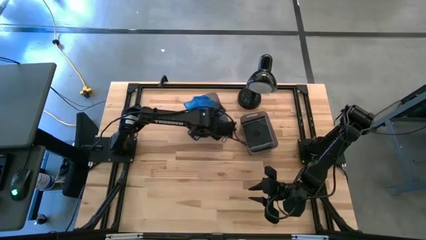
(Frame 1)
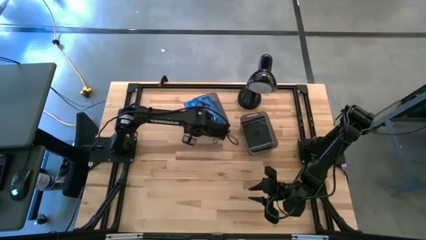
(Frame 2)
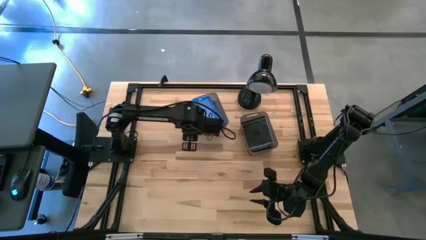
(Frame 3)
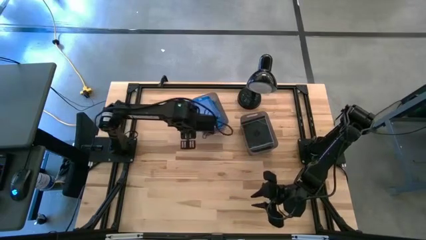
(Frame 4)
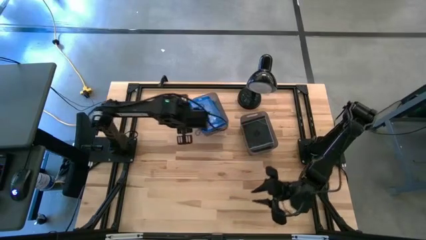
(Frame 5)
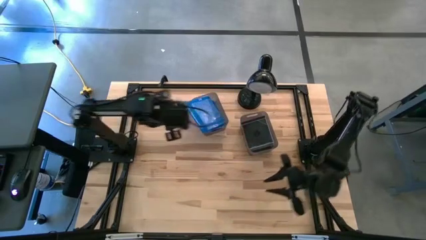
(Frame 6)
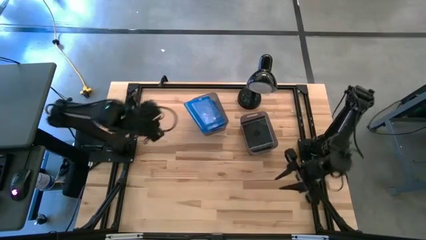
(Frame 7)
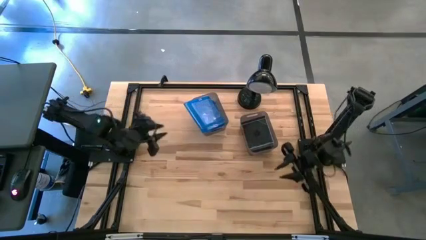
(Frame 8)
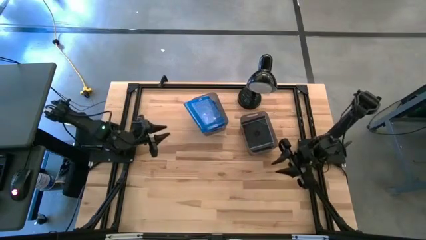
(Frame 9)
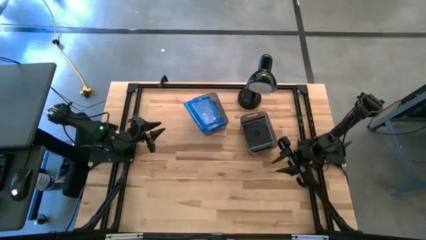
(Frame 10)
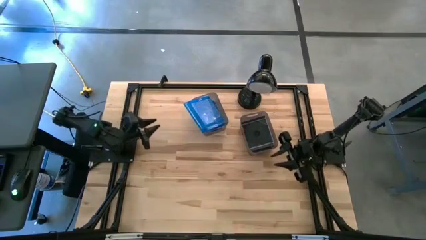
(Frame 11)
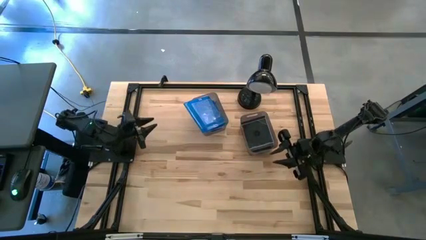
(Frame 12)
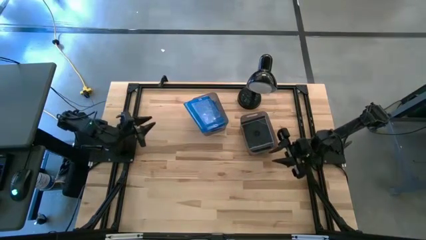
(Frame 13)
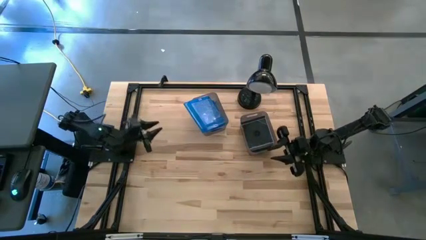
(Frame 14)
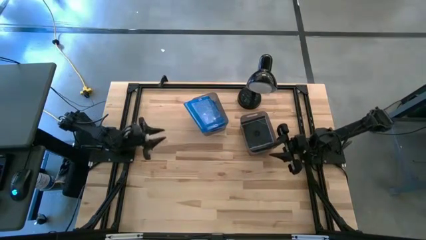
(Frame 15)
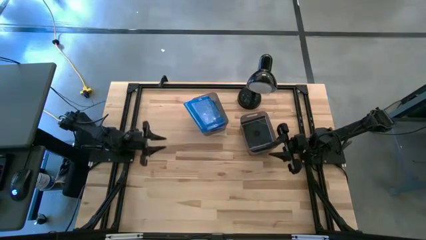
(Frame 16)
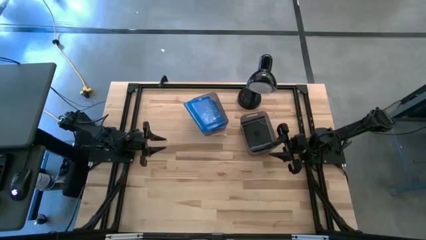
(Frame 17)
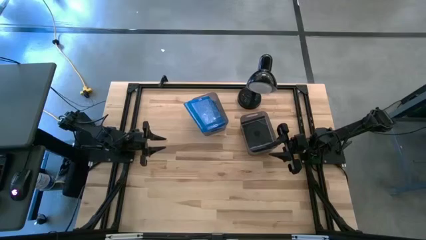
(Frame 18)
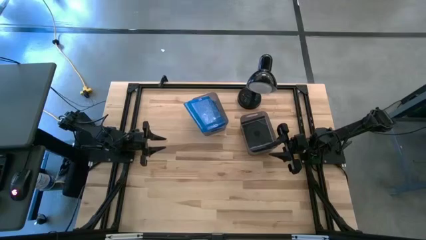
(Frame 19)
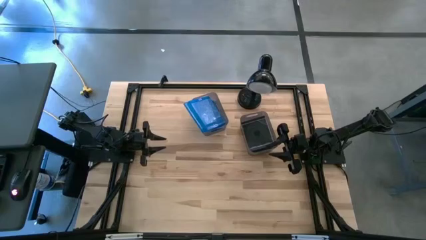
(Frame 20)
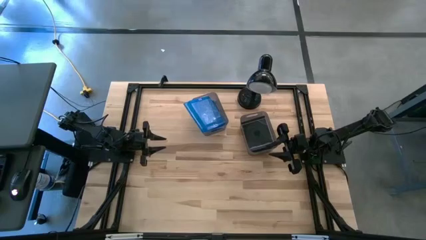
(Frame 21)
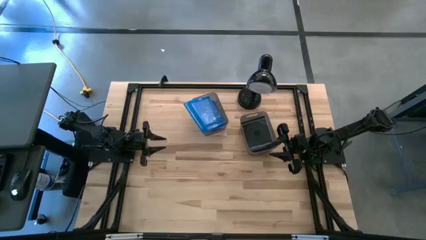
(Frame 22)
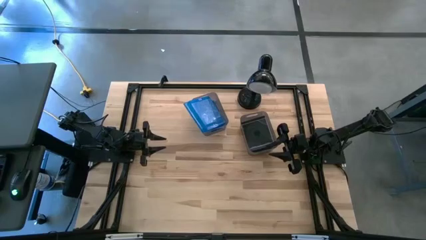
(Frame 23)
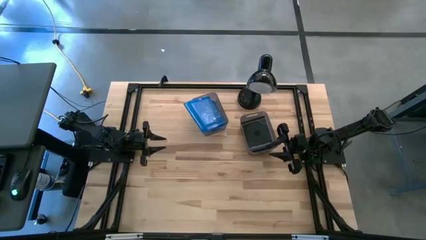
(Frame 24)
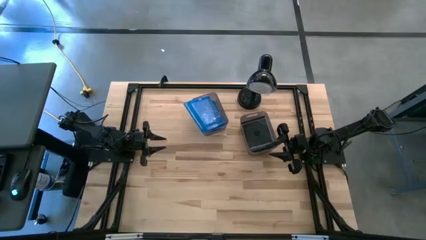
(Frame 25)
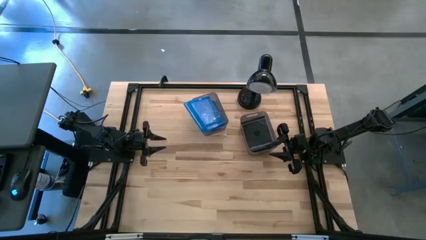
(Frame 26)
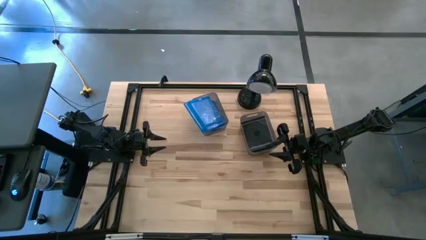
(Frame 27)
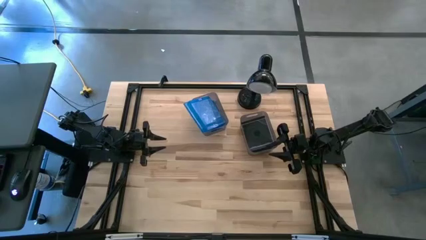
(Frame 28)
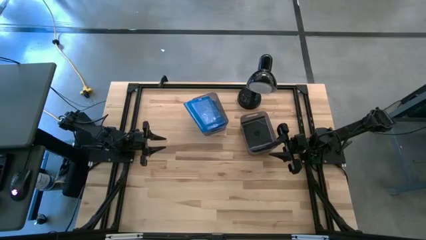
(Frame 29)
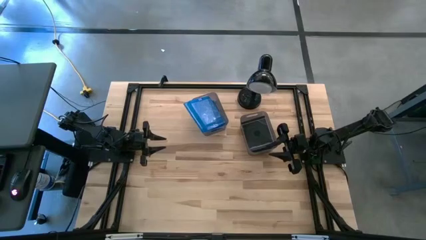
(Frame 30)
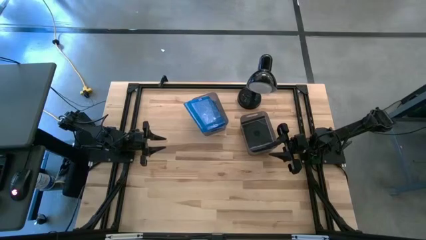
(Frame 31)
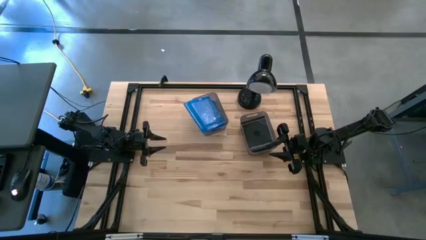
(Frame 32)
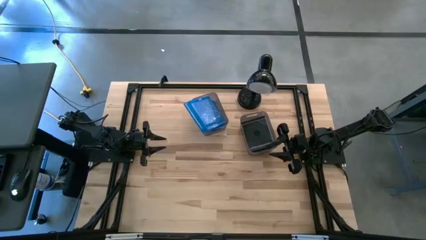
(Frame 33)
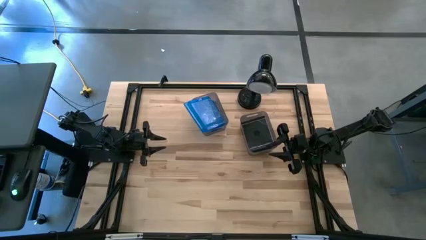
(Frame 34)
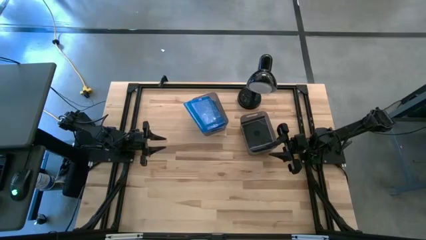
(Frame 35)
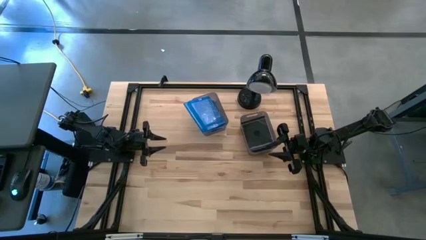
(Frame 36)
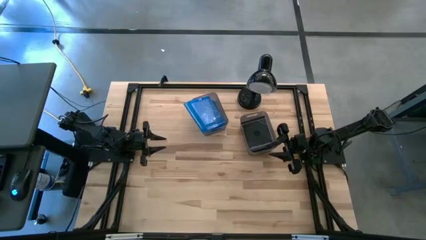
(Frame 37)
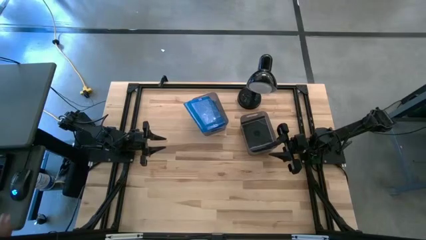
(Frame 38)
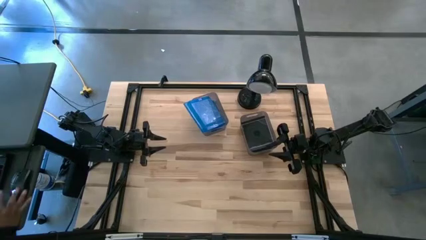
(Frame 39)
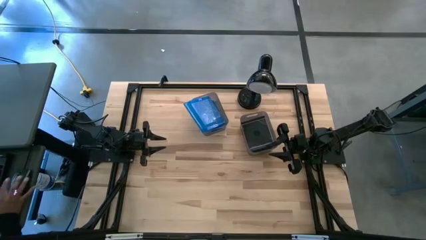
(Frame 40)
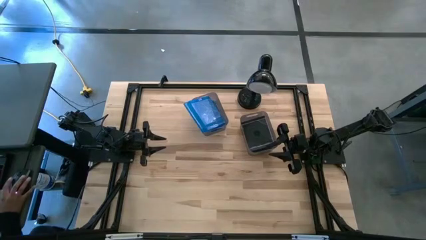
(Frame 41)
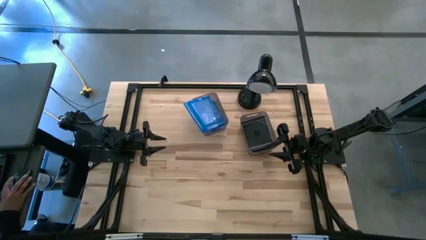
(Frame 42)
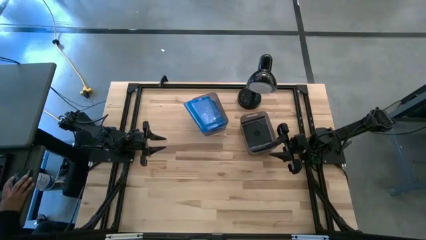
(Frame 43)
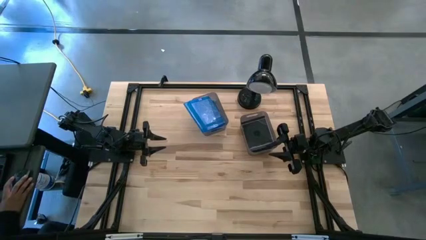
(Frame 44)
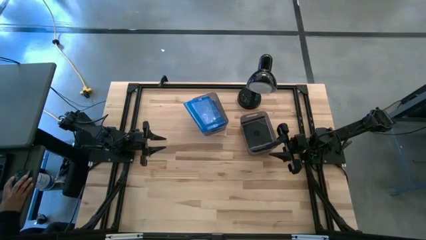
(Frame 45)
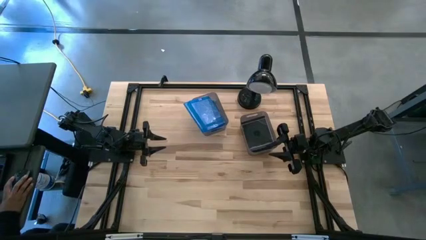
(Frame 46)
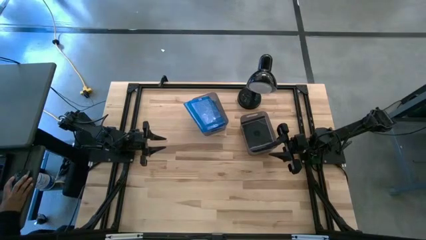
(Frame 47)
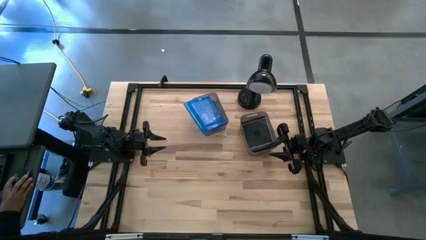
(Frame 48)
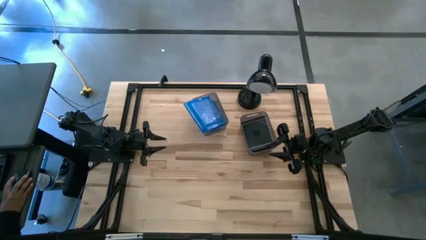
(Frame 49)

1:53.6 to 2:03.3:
Task: Pick & place jewel cases by type
Return to Home Position

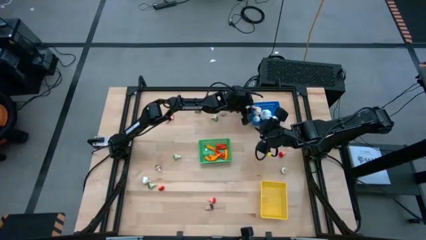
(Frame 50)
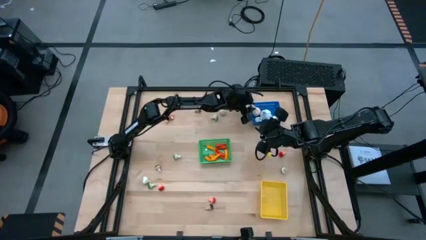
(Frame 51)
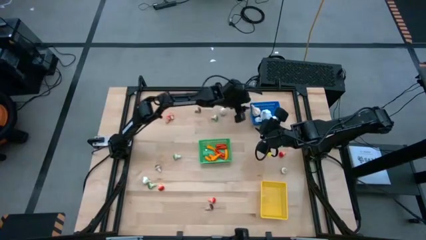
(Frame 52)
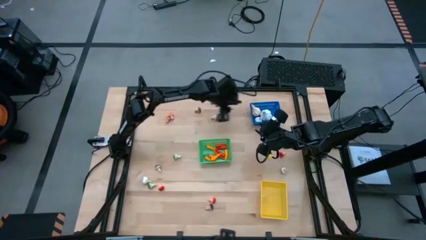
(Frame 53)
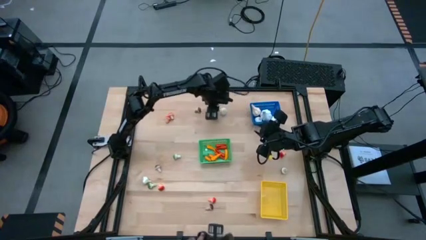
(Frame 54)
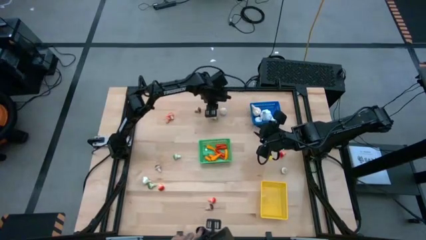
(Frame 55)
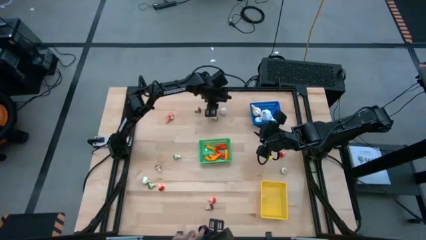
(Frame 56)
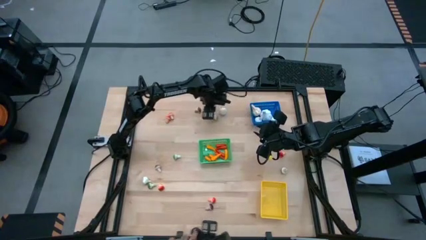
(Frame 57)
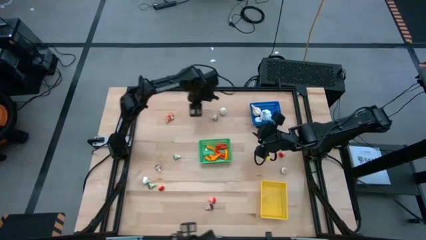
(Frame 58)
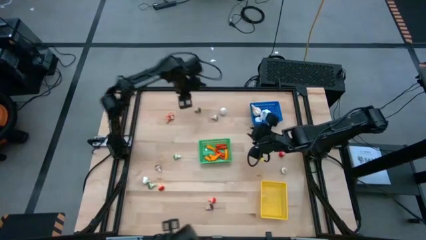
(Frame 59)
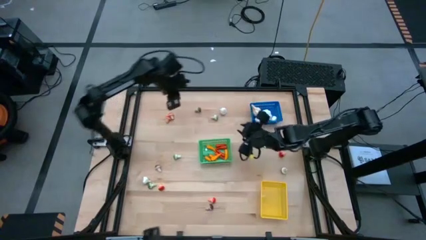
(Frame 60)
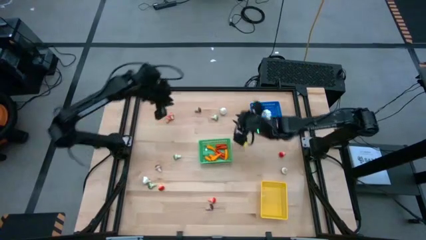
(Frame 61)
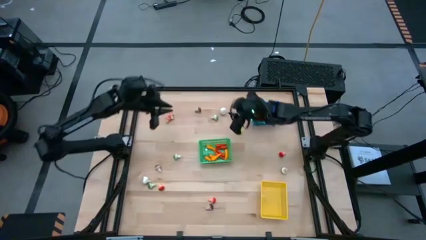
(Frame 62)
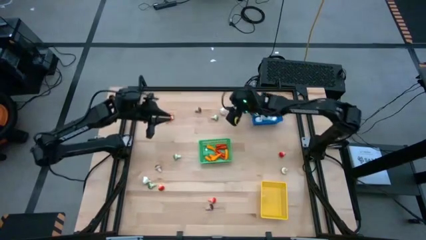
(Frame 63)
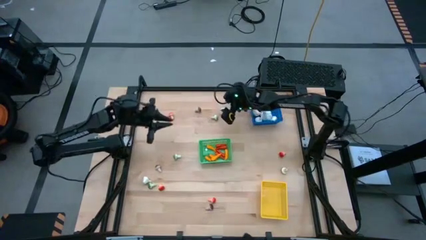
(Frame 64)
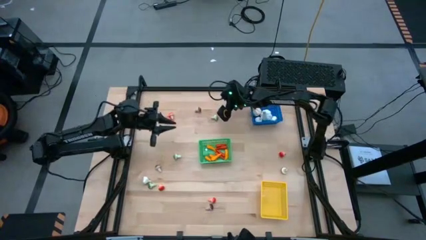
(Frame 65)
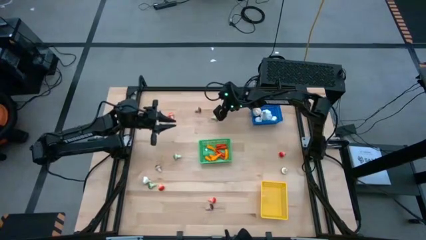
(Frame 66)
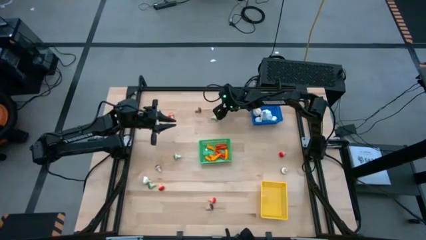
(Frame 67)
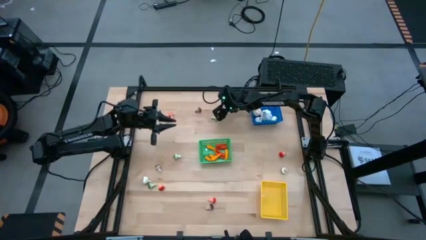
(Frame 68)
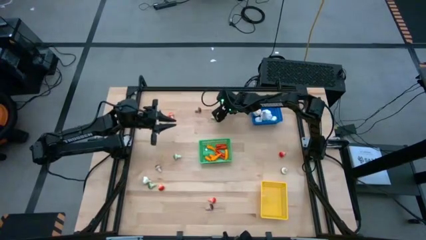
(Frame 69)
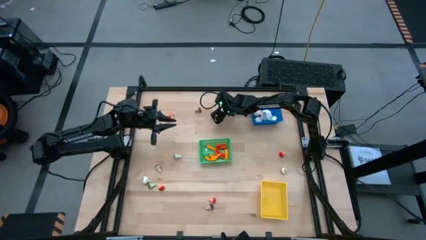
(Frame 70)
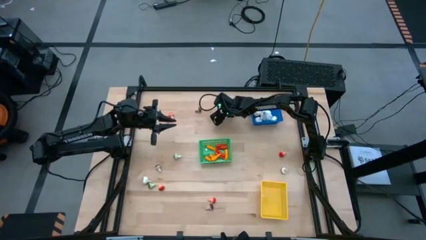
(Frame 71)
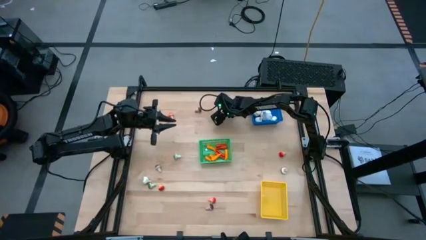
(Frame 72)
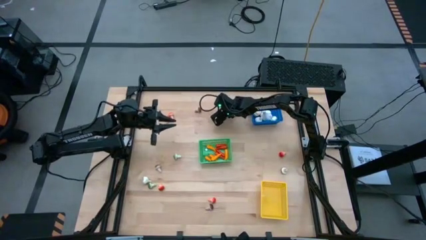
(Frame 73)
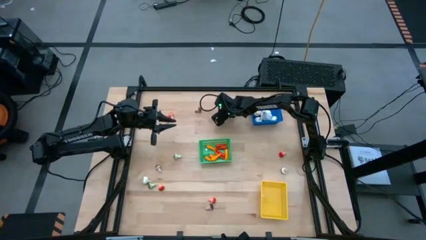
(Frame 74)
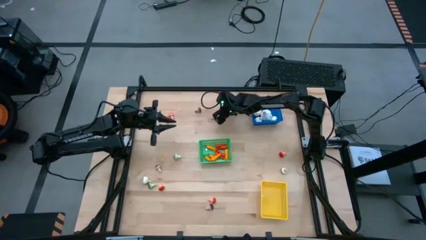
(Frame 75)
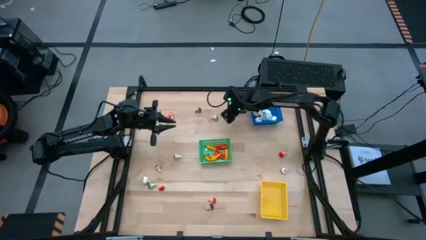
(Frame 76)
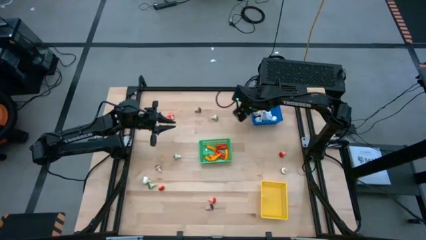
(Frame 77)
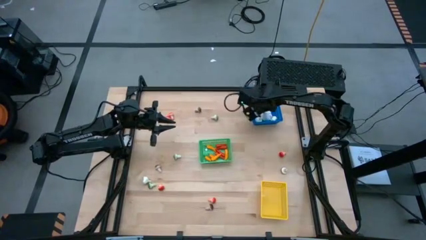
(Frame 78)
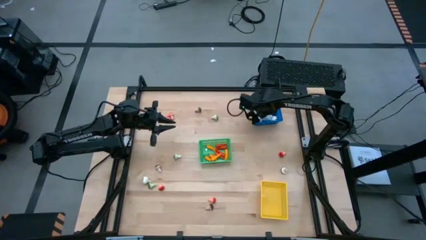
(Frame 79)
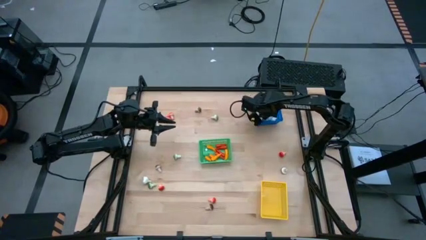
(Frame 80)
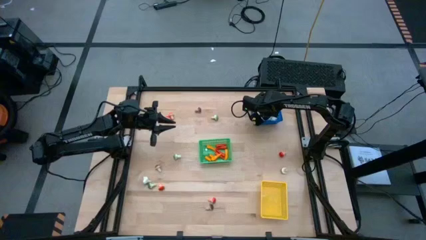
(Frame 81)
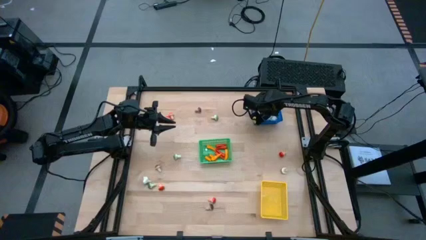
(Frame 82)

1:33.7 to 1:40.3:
Task: Sort produce into baskets
Put the garlic into the blue bin
